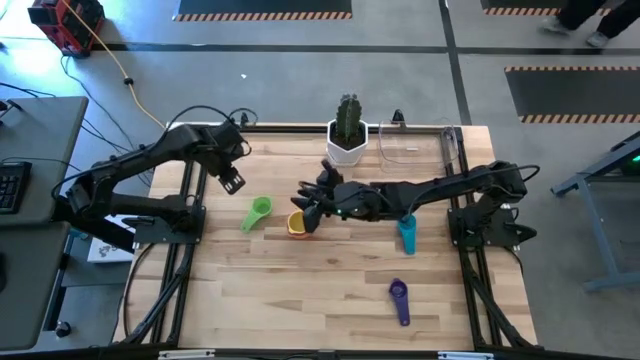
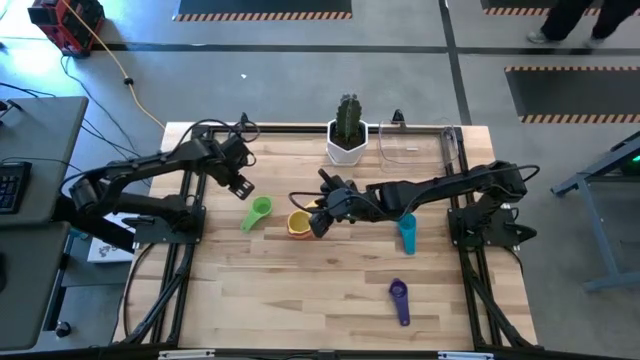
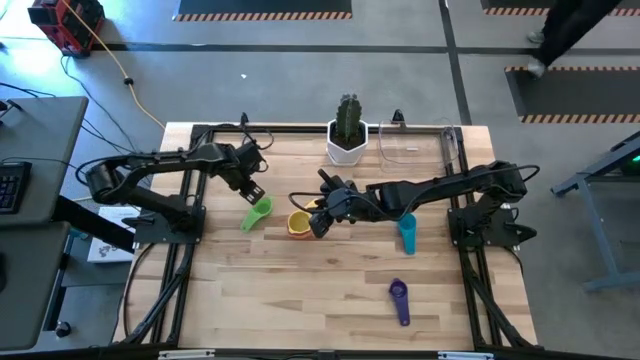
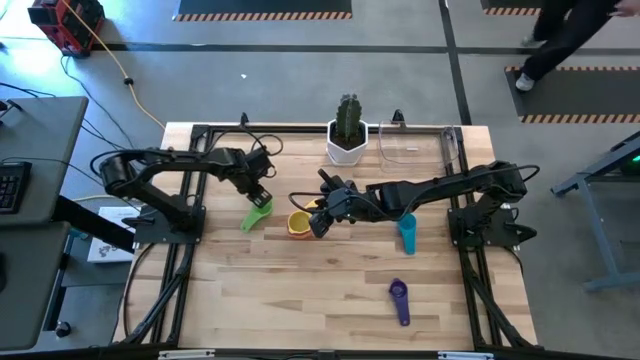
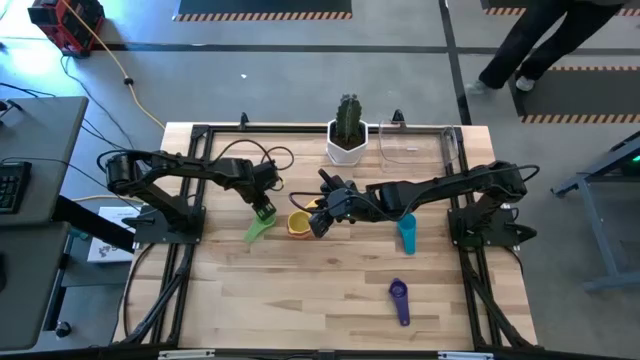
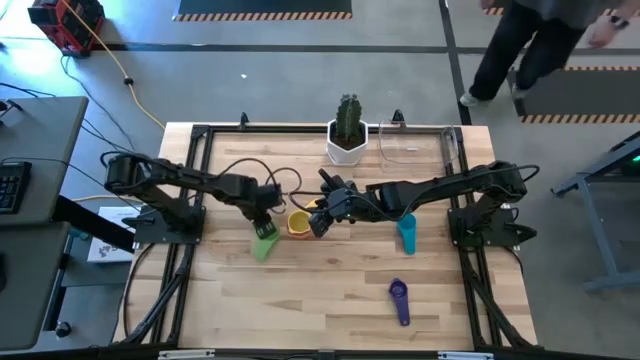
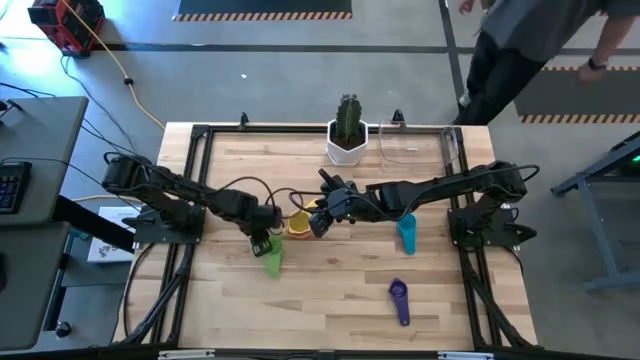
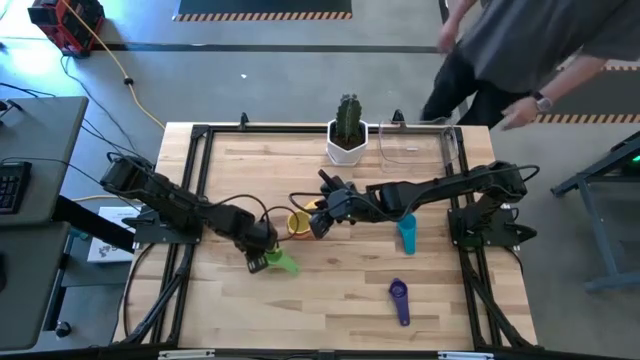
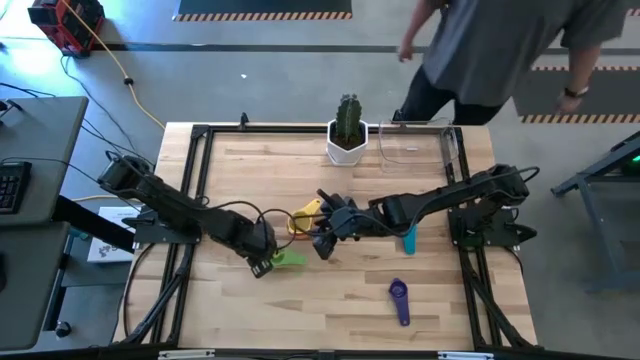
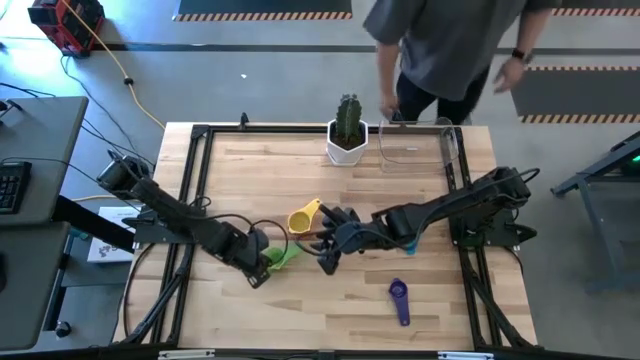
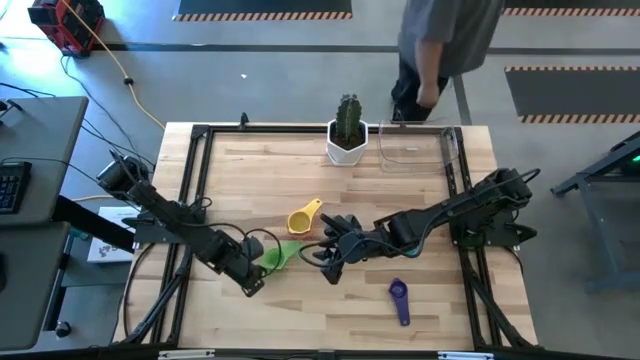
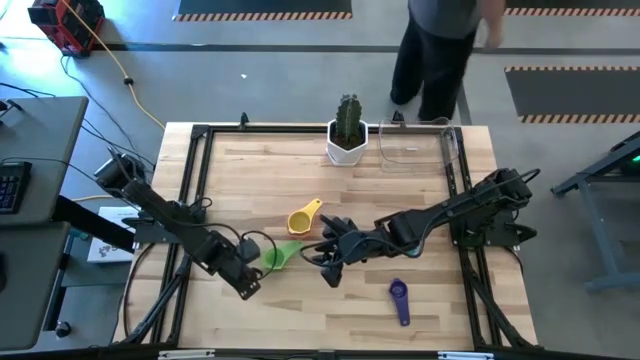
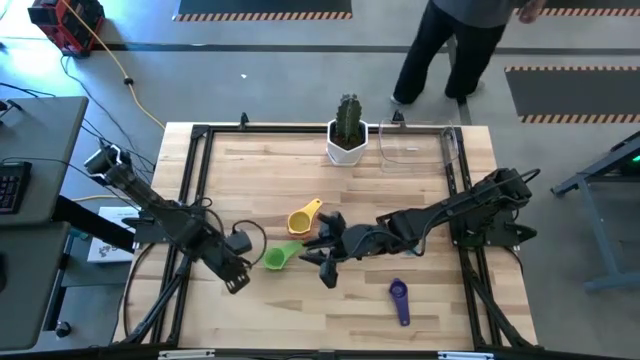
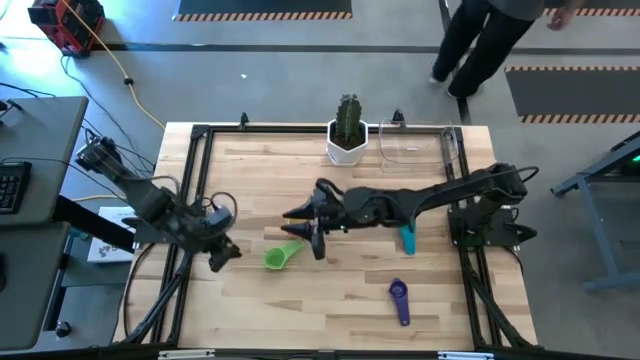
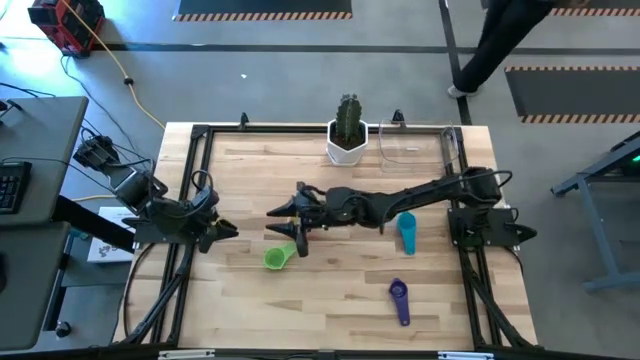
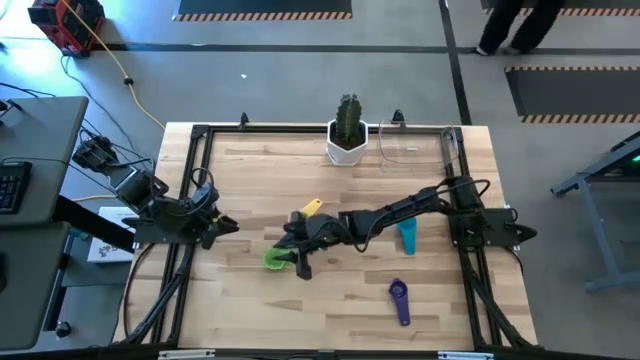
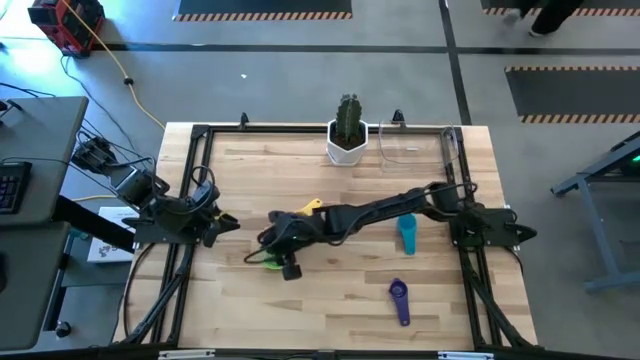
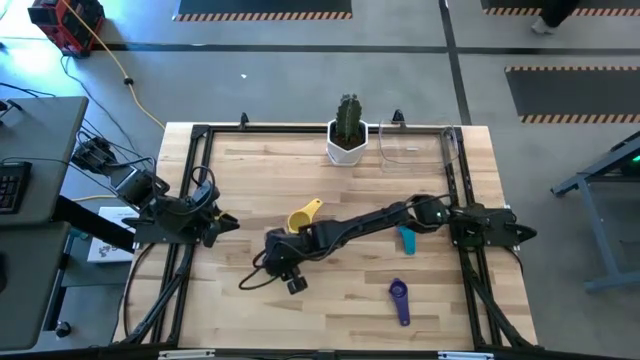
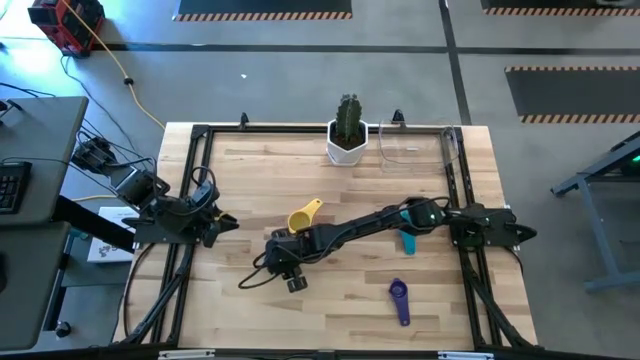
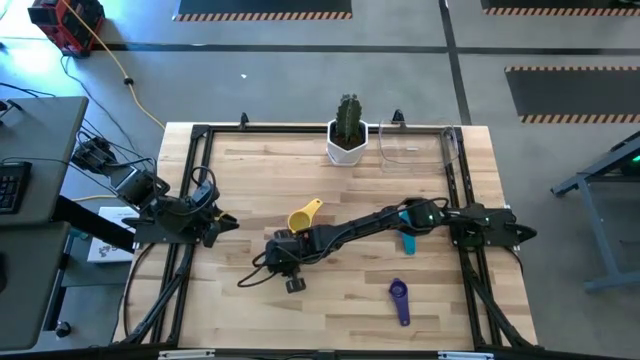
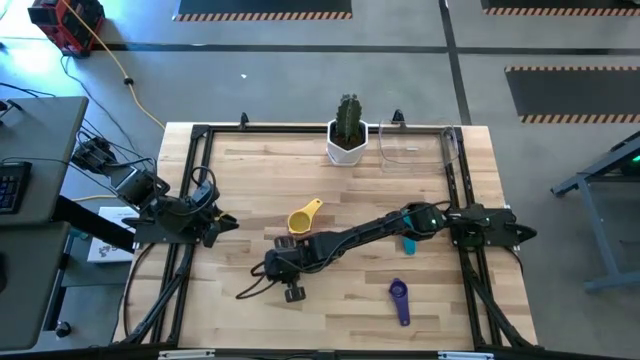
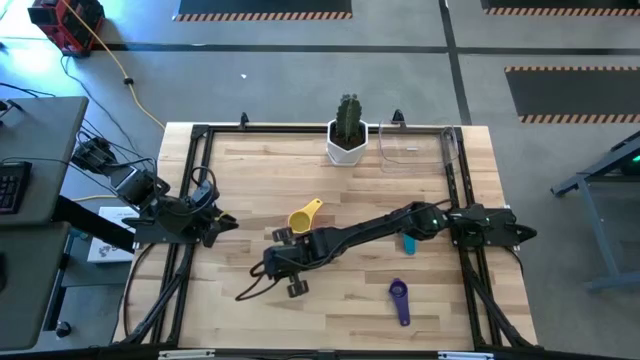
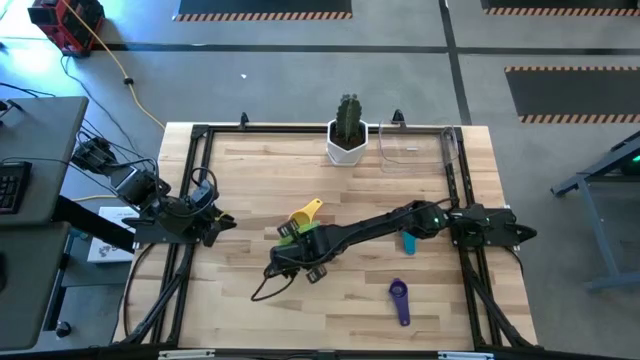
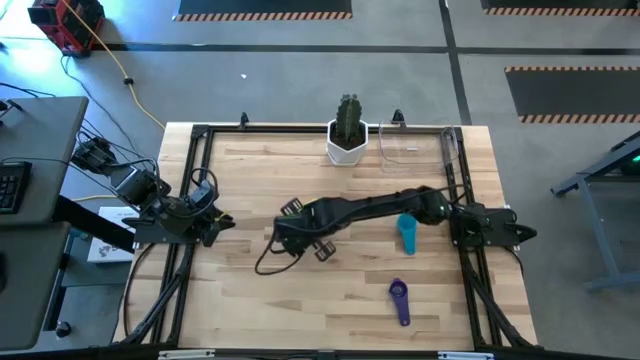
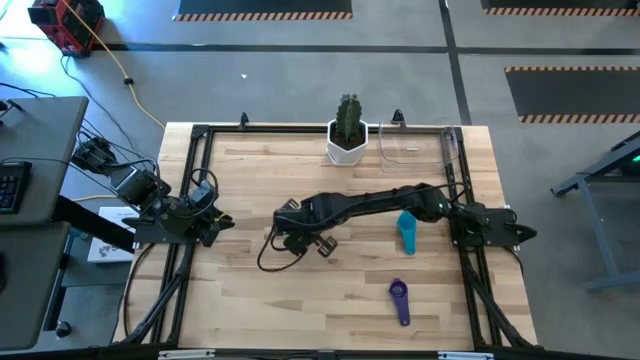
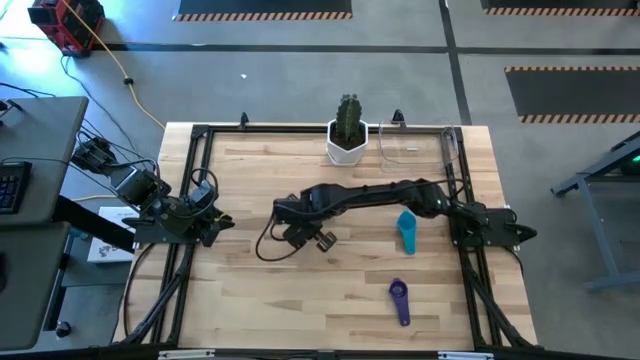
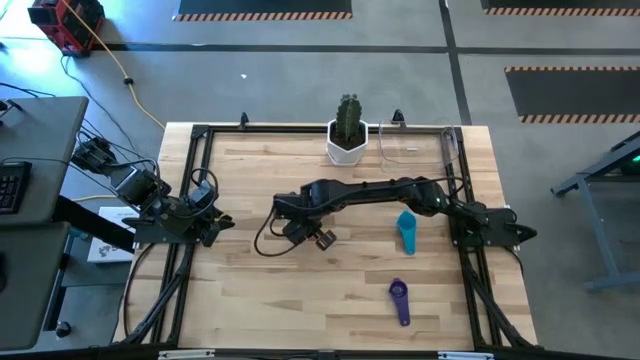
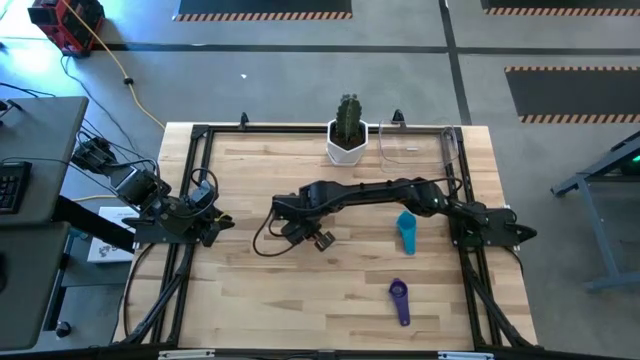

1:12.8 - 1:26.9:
Task: Nest measuring cups in basket
Stack the green measuring cup on top of the yellow measuring cup

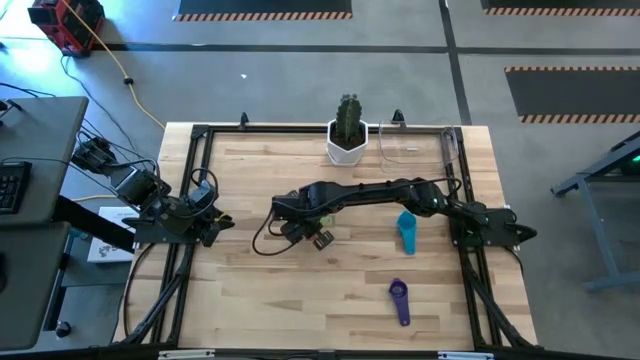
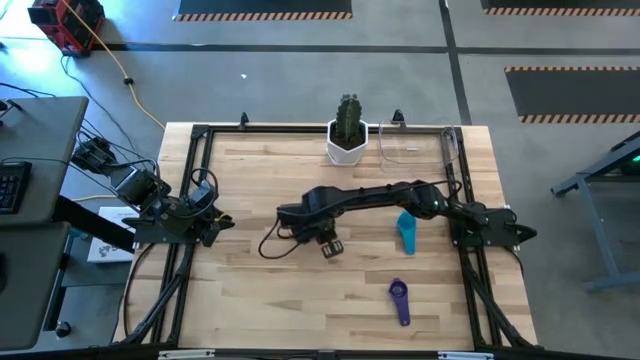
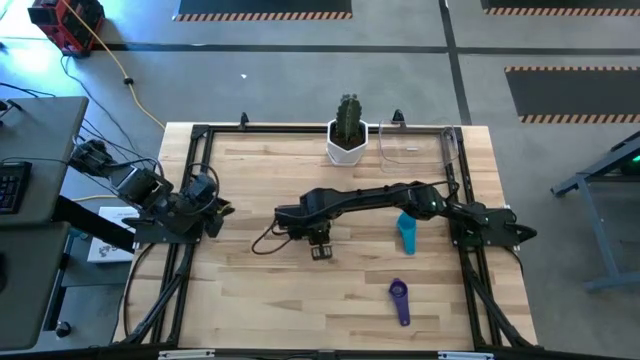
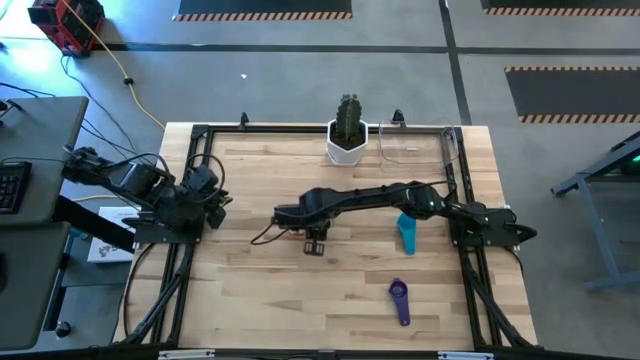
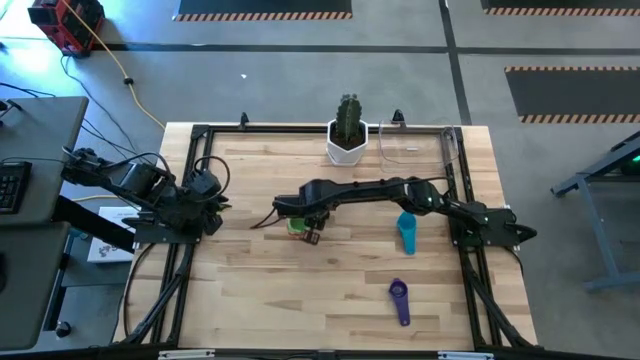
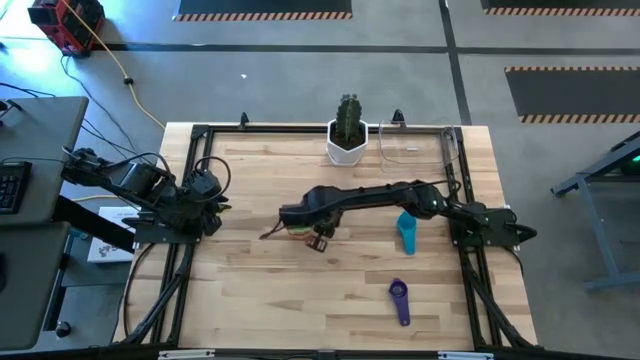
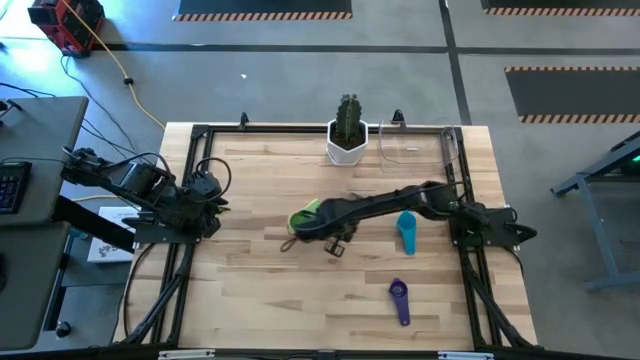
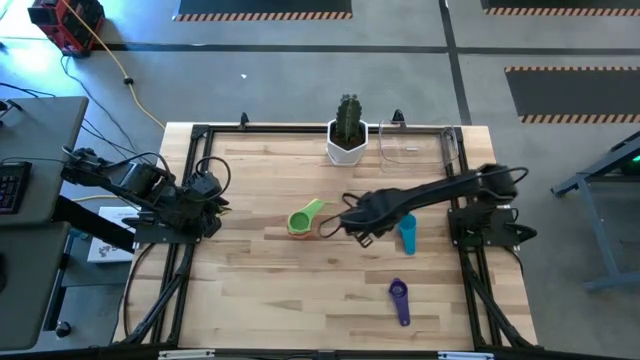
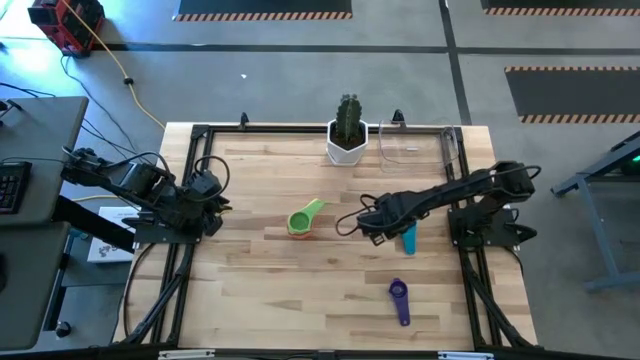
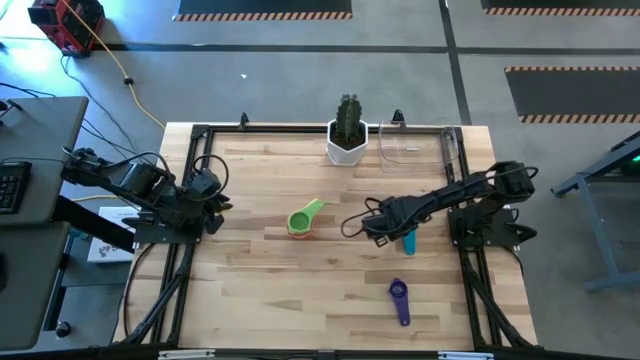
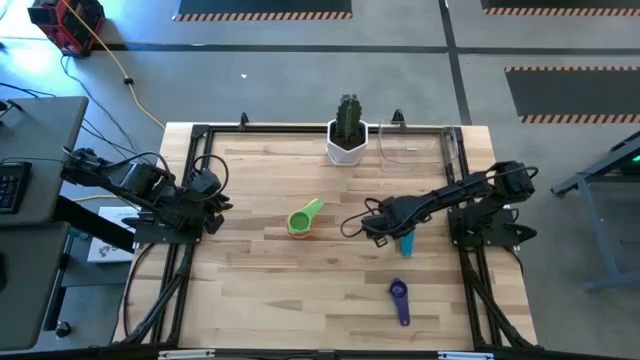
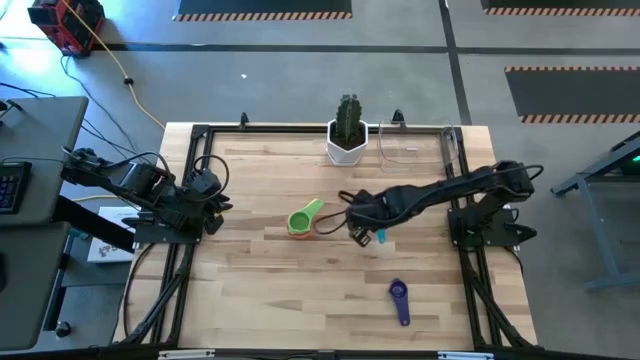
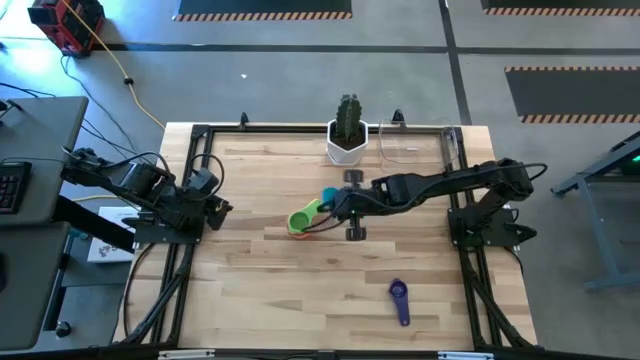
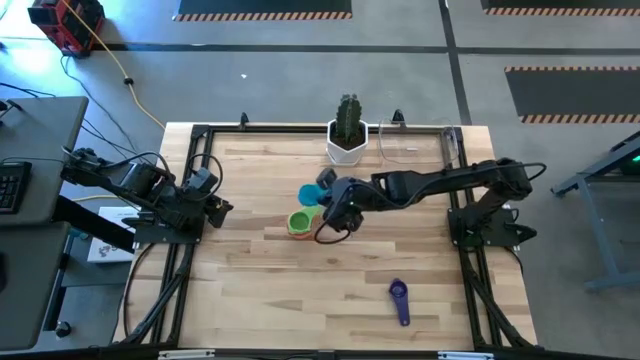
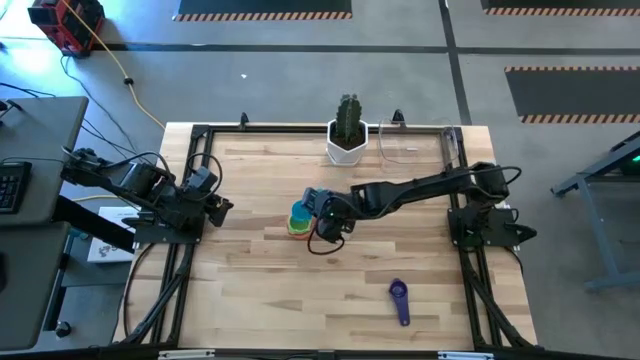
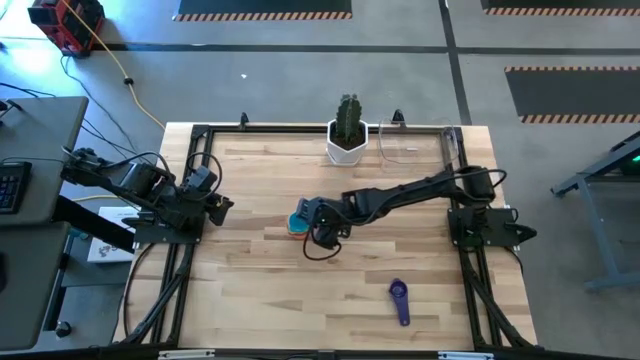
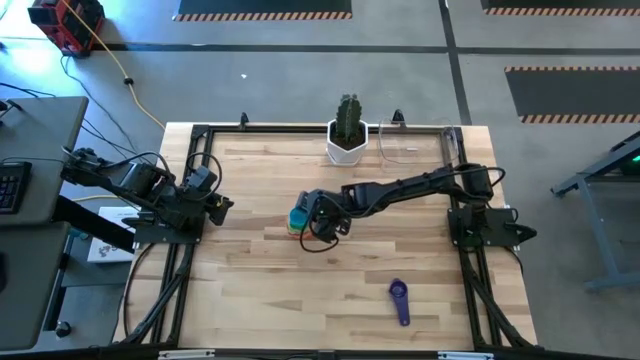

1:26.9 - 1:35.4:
Stack the light blue measuring cup on top of the green measuring cup
